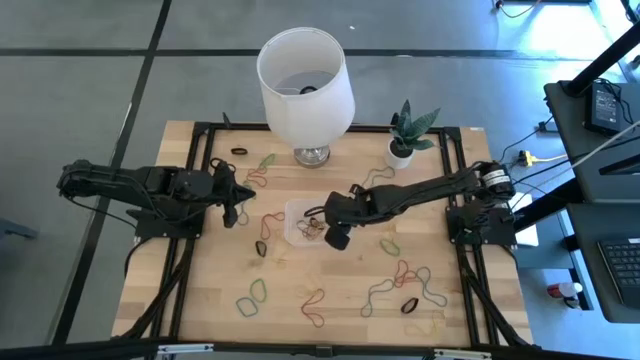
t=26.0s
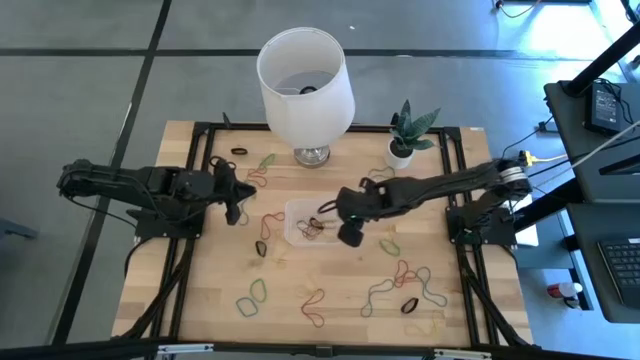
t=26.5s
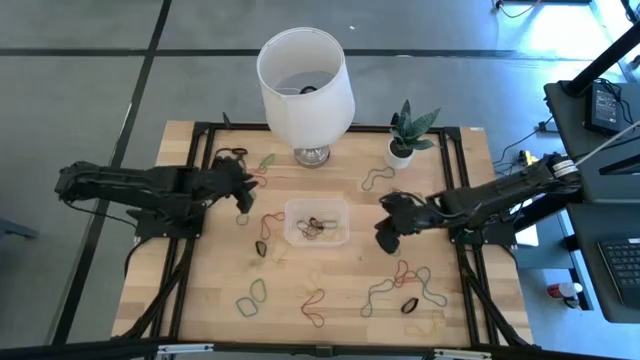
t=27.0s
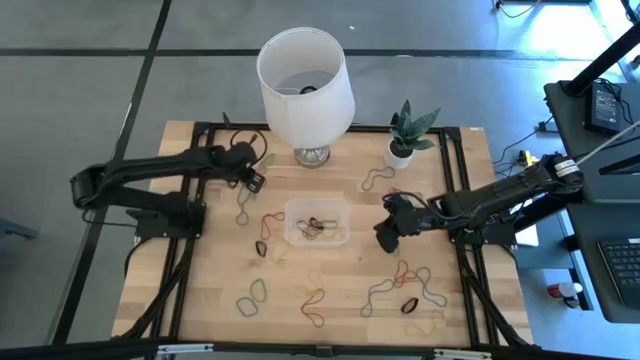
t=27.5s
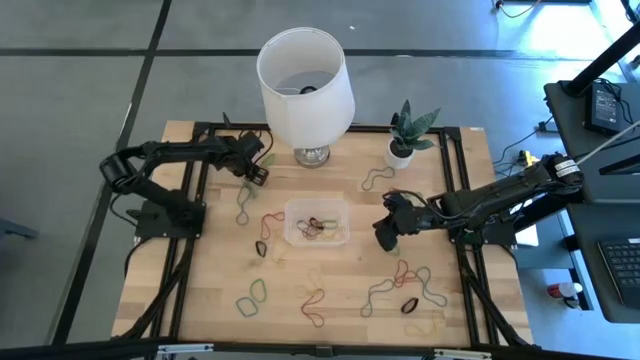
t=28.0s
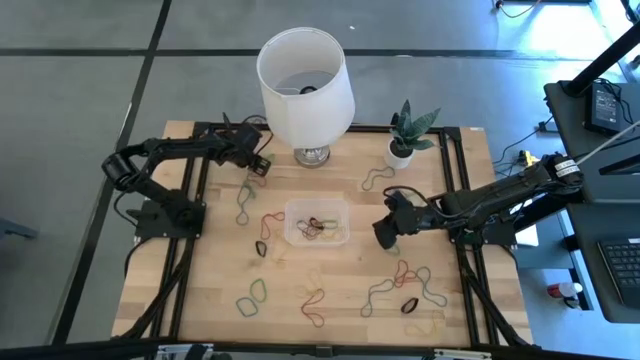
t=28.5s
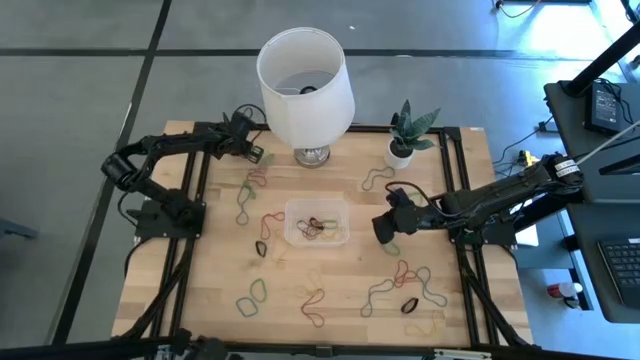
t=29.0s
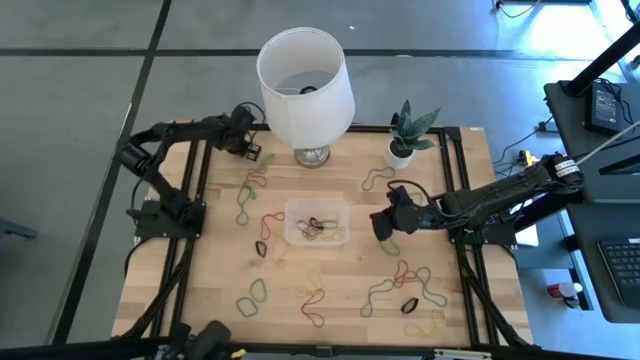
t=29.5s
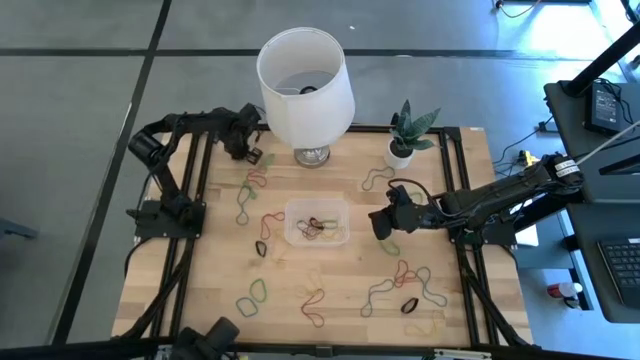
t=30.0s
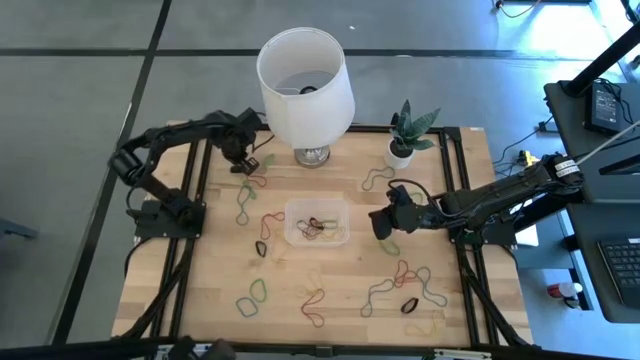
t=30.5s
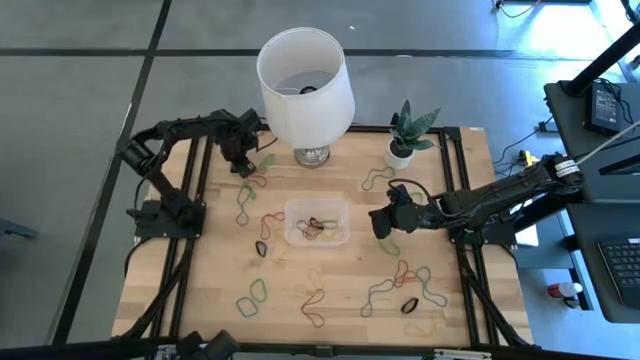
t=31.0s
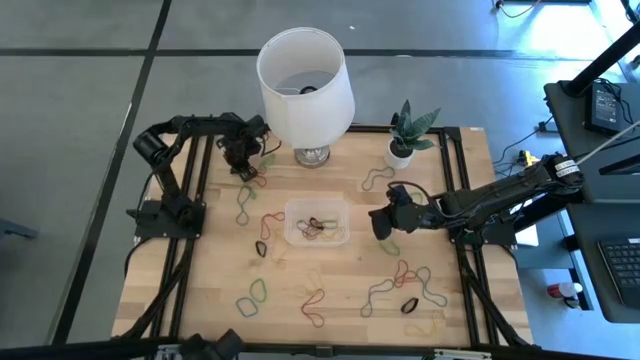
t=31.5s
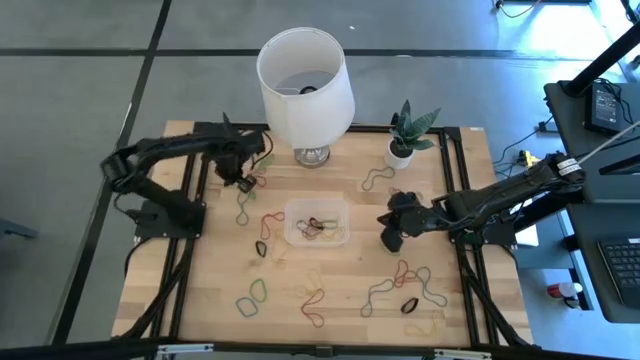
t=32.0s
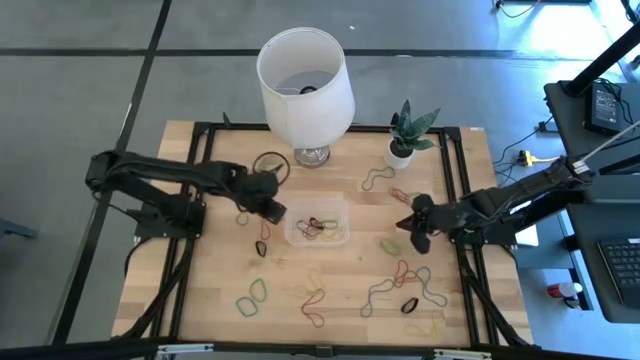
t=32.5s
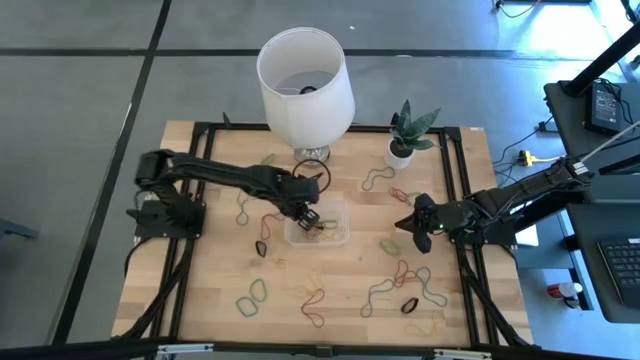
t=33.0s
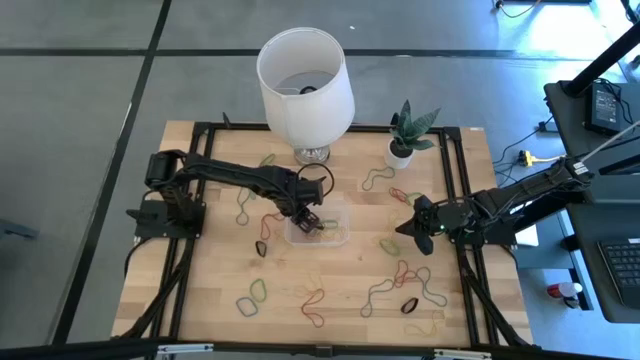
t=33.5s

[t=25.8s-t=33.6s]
Task: Pick and place rubber bands into bin
Put the top left black rubber band into the transparent bin

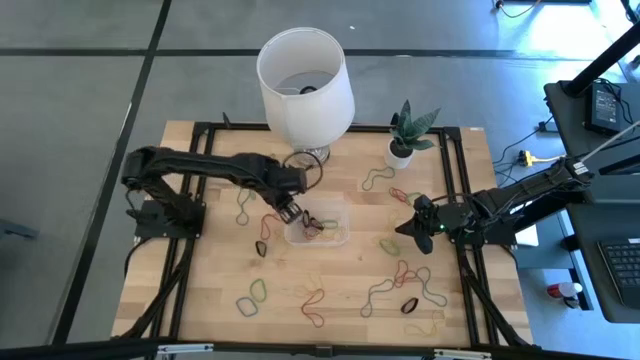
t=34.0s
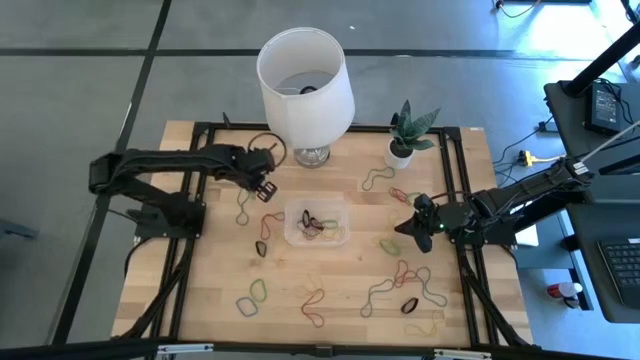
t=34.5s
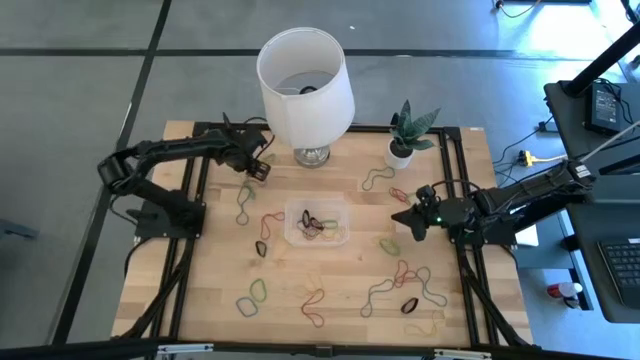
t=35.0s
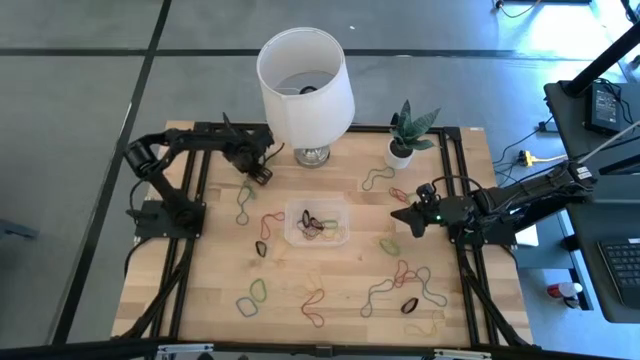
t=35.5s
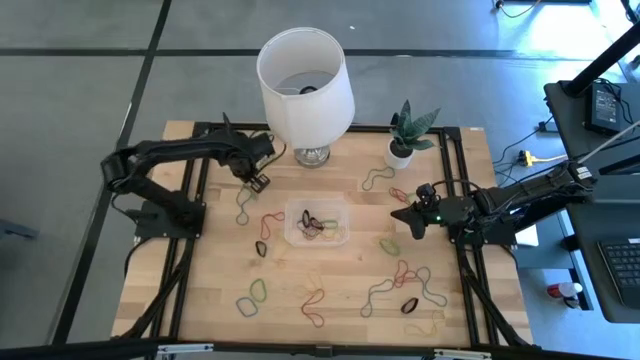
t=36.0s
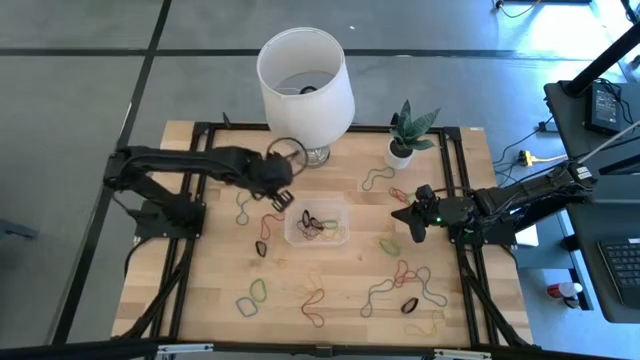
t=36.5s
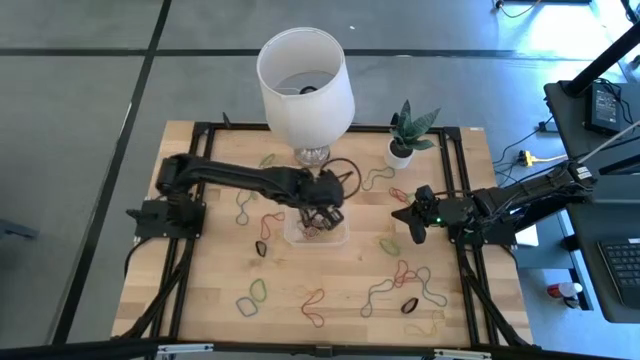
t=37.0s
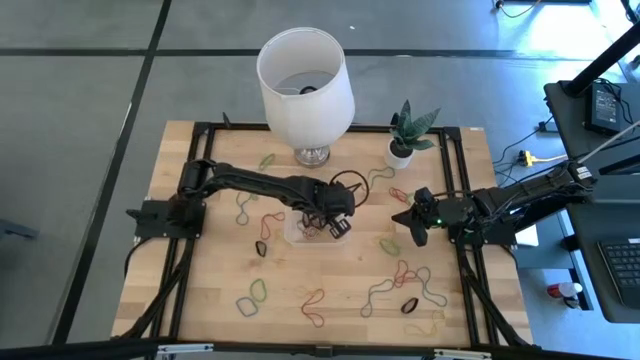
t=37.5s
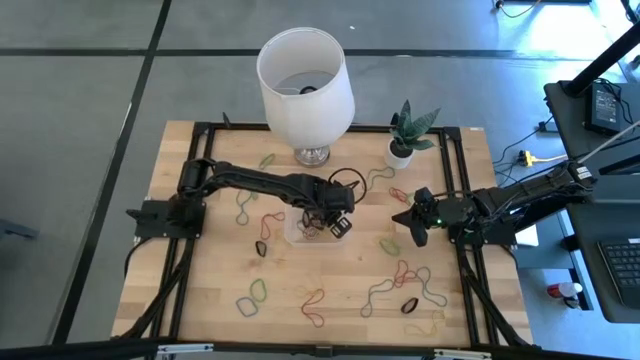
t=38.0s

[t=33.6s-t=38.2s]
Put the red rubber band into the transparent bin

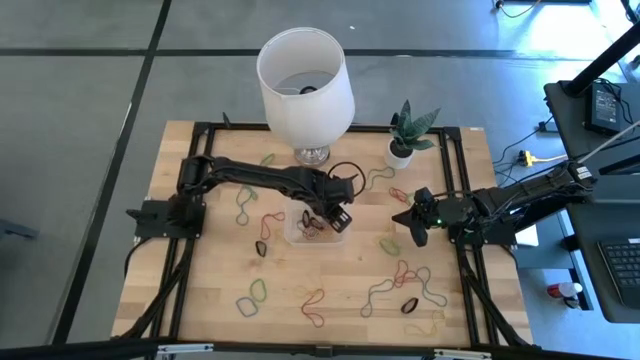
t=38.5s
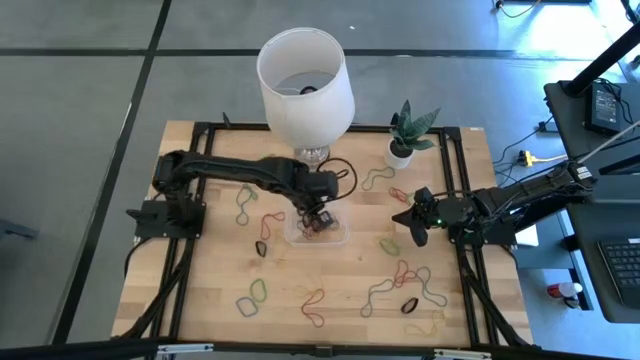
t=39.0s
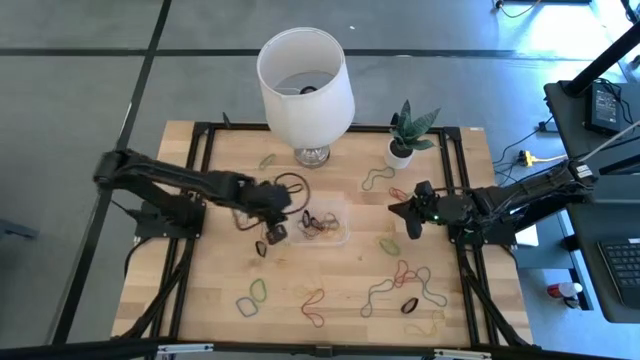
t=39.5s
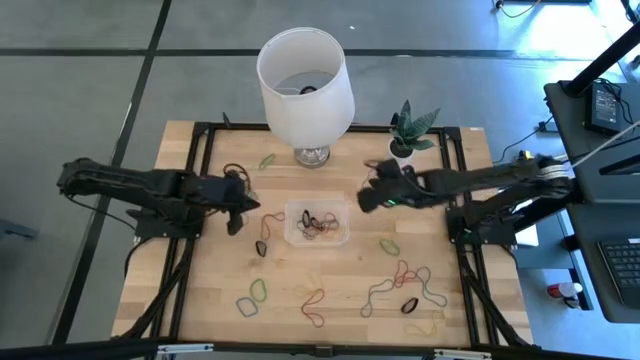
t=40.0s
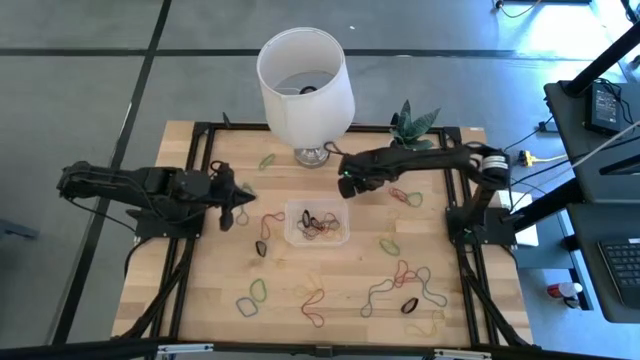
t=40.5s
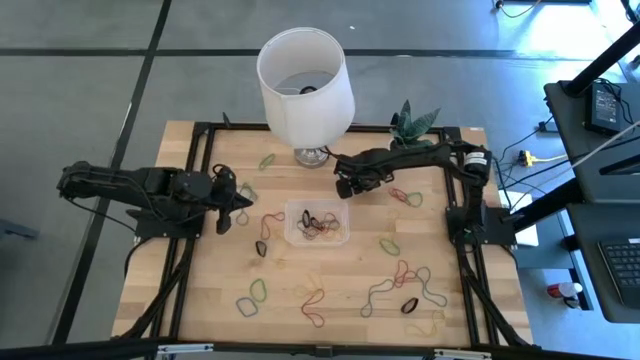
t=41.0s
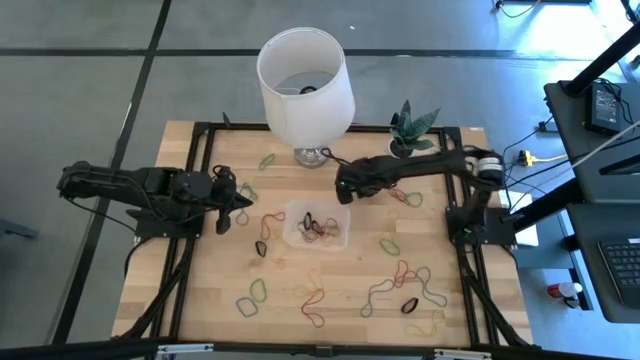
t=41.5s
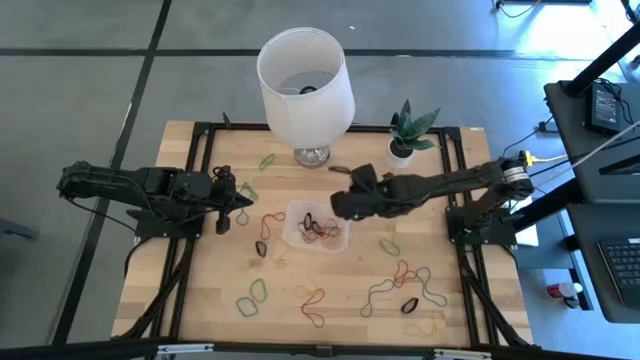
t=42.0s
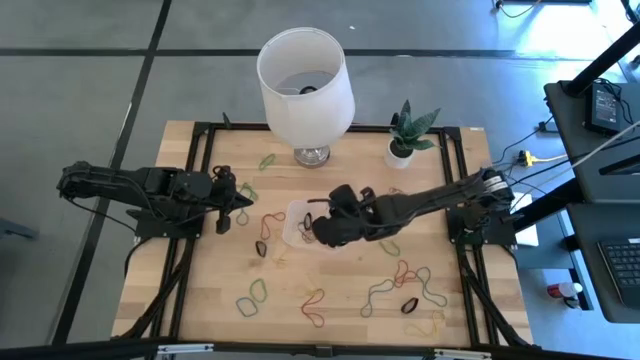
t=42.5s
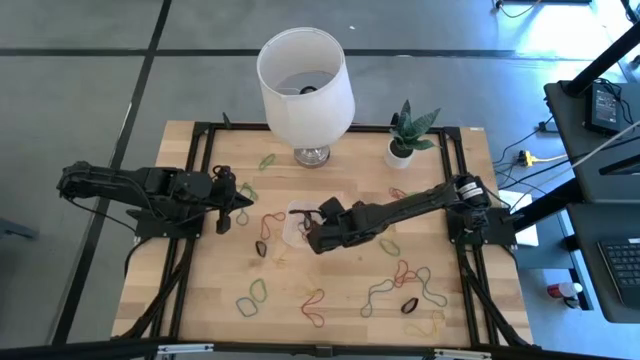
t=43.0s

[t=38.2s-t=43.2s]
Put the blue rubber band into the transparent bin

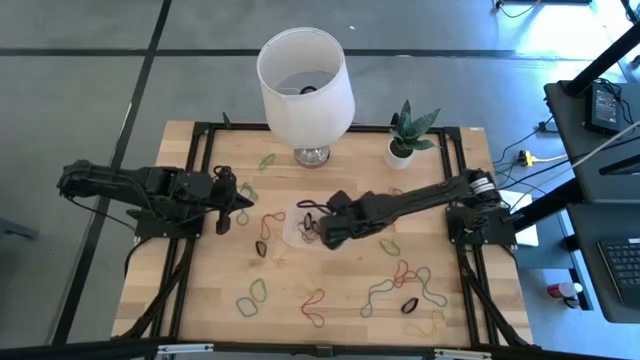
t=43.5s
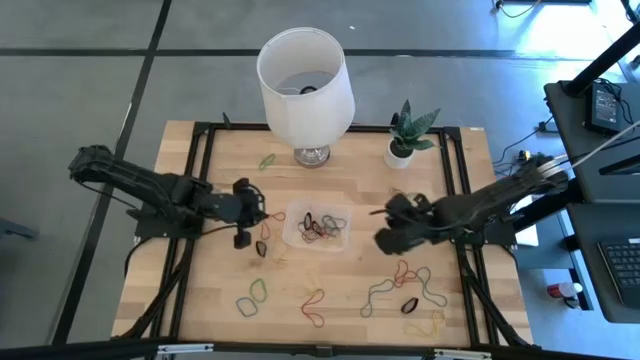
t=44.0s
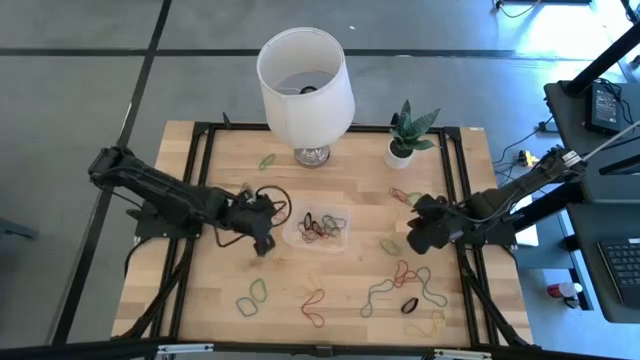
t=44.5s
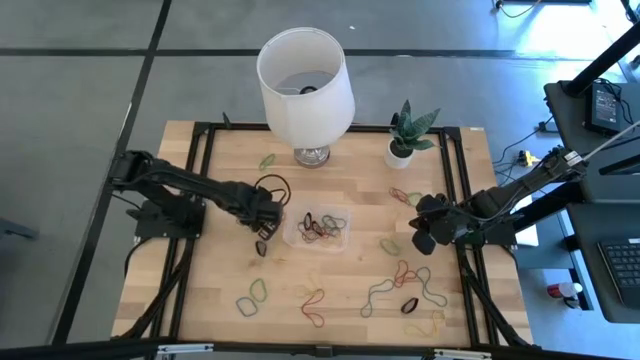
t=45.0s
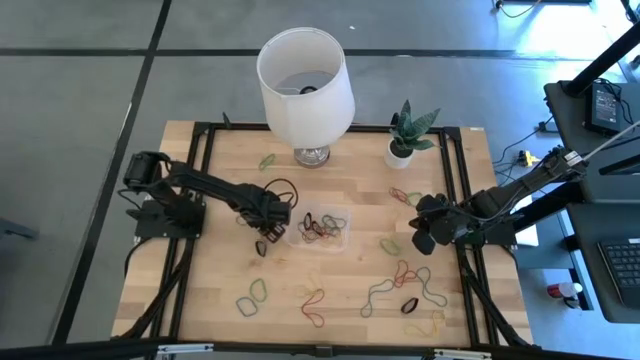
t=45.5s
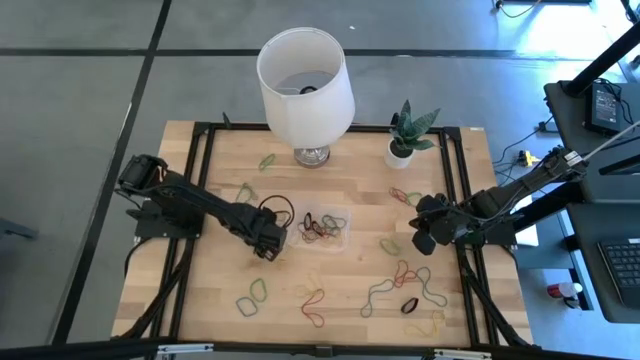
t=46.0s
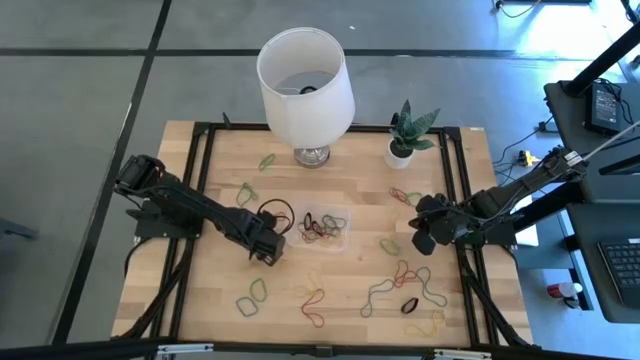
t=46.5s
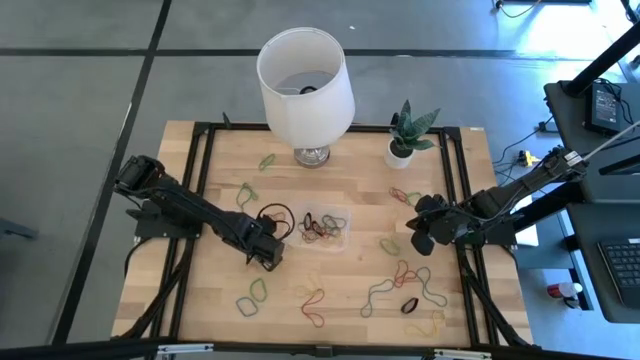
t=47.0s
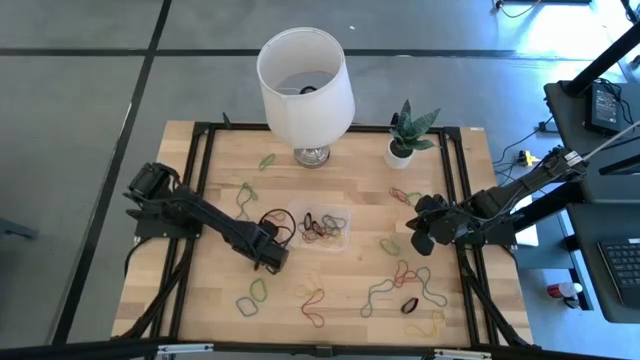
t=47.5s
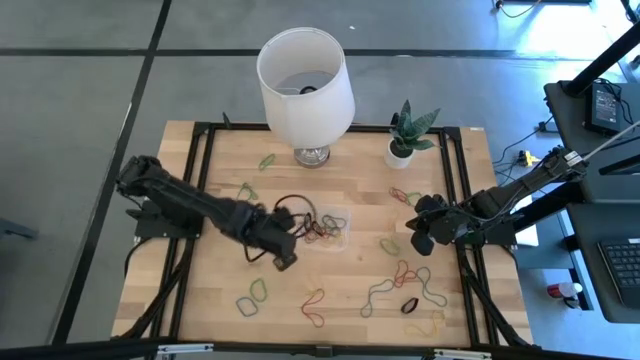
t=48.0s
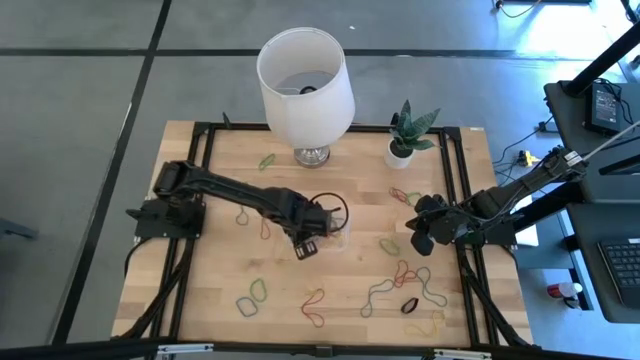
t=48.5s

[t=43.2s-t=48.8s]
Put the left black rubber band into the transparent bin
